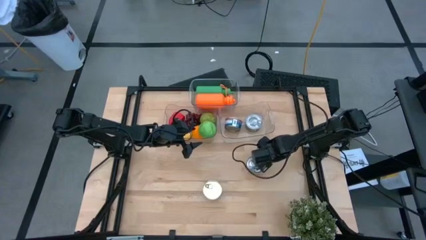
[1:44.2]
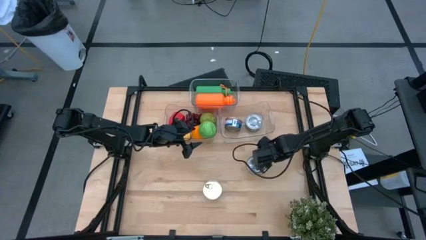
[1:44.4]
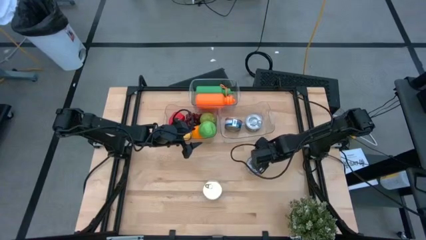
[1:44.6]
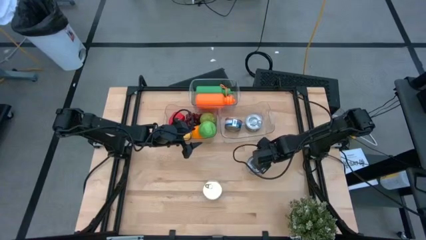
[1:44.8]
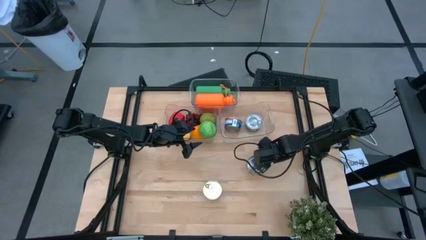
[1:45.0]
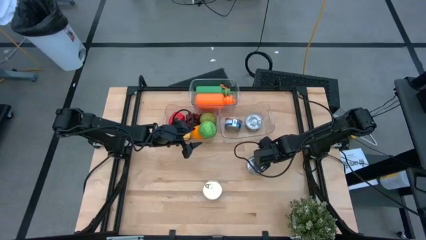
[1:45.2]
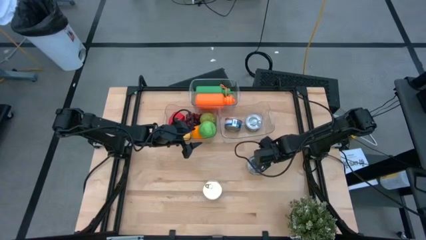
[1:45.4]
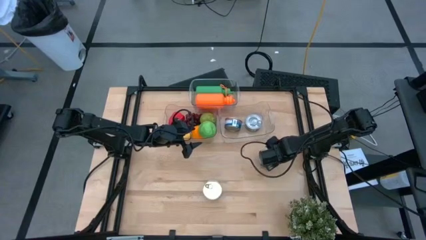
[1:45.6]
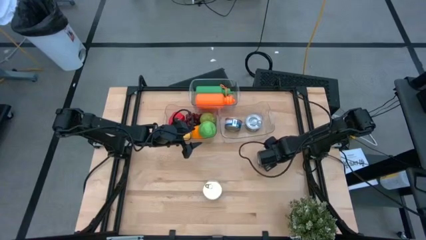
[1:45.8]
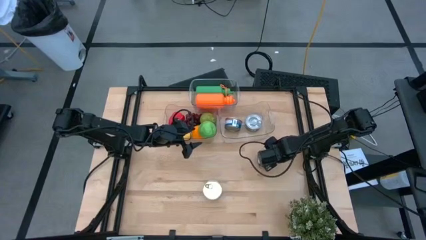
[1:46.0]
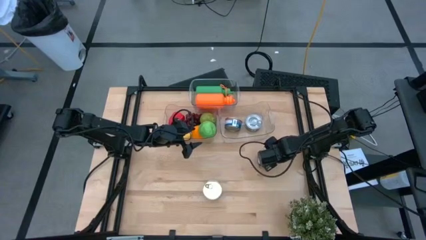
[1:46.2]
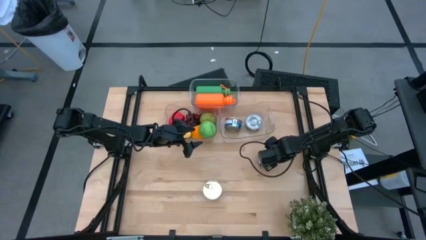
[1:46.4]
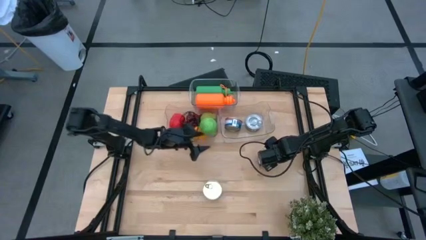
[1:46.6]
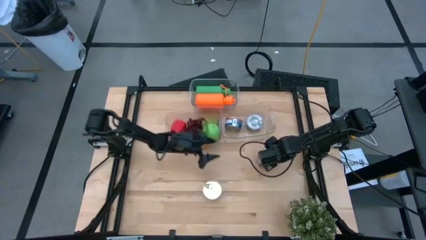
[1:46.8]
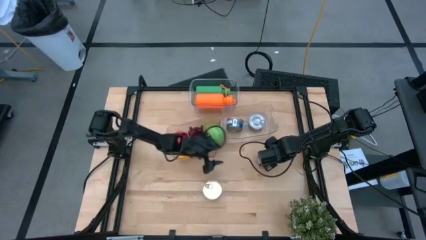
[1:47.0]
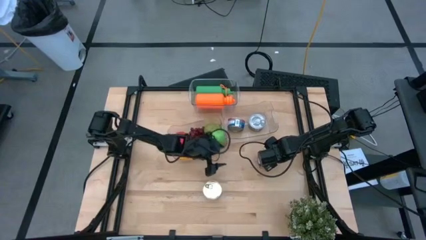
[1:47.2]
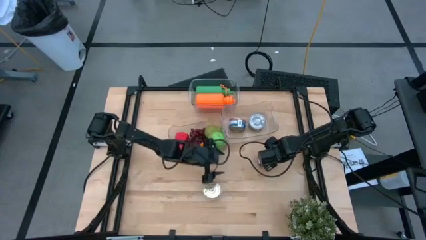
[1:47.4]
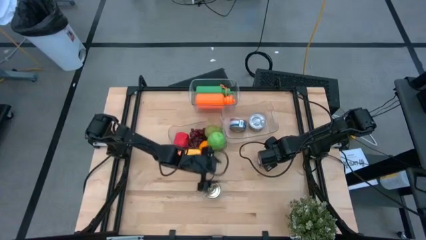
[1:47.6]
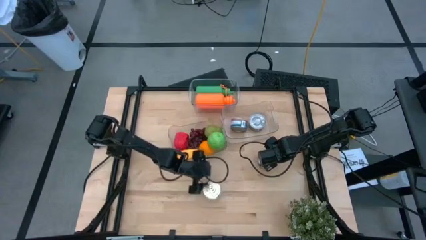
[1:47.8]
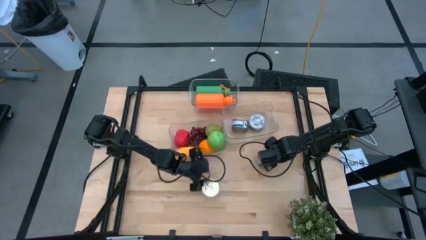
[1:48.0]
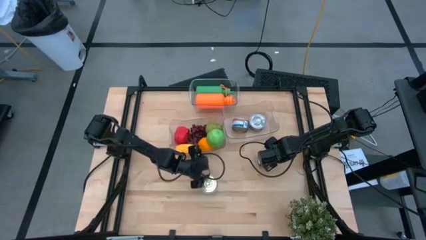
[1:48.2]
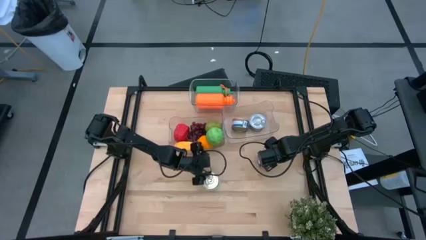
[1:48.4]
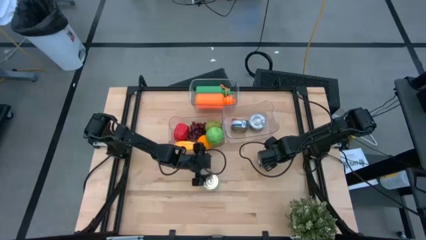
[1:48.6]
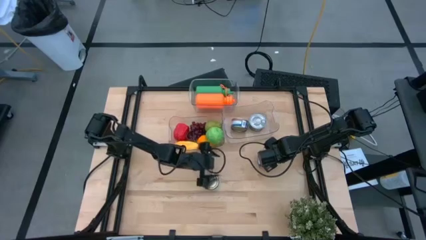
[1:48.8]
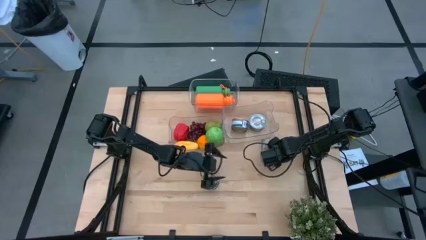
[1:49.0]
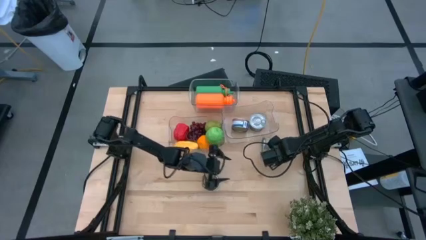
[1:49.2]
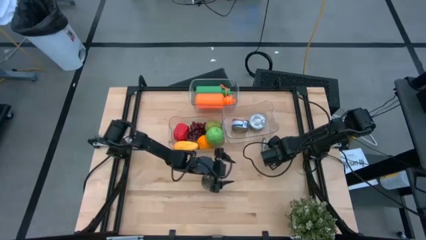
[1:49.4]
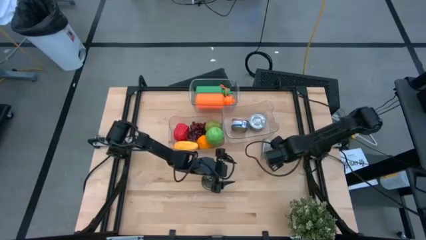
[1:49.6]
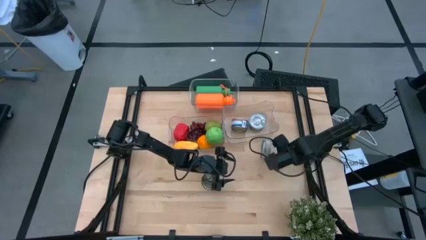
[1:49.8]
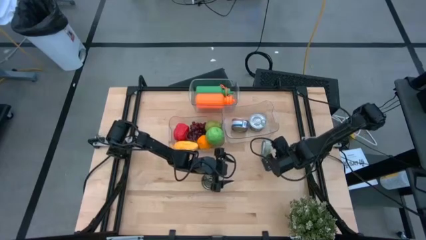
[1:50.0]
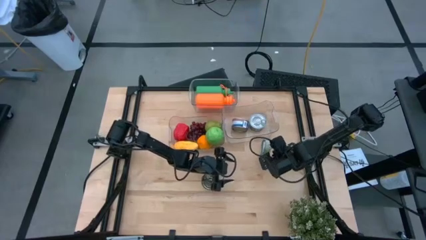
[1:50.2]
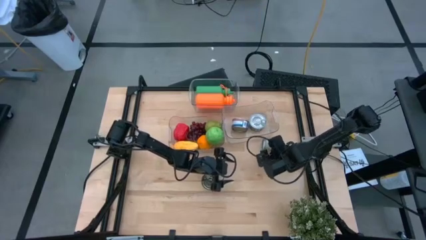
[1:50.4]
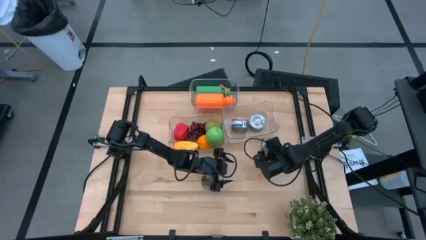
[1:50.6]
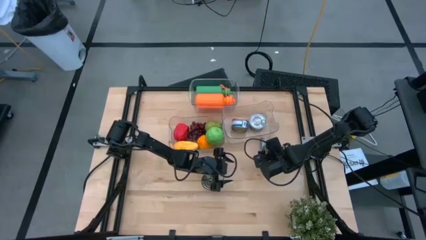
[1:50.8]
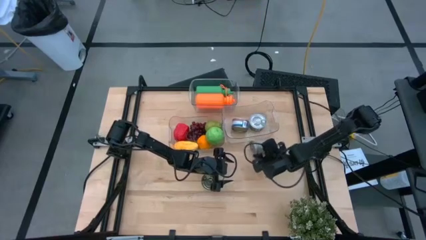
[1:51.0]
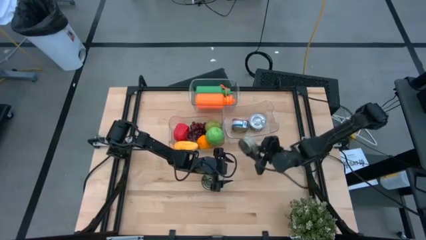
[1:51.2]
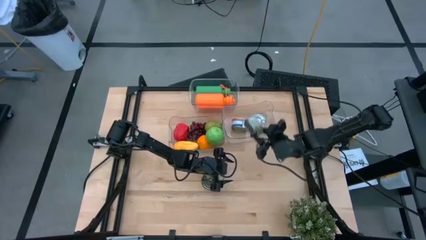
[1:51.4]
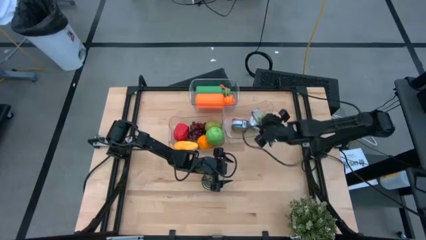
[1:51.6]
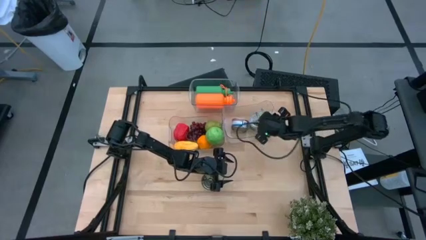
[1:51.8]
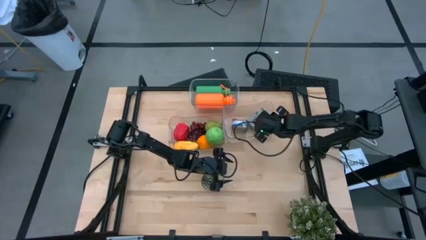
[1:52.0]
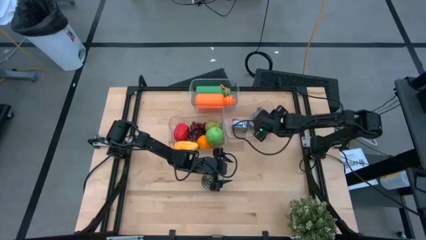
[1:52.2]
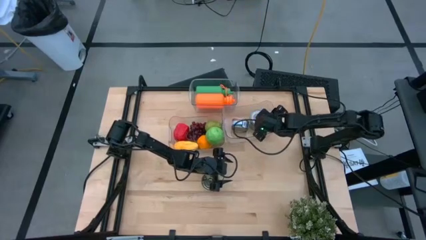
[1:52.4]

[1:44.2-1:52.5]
Task: Pick & Place Food Item
Put the green tuna can into the bottom right transparent bin

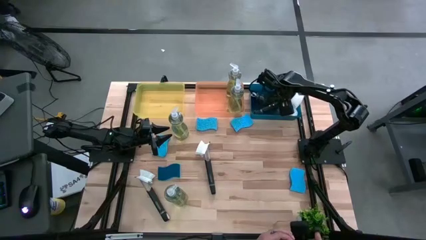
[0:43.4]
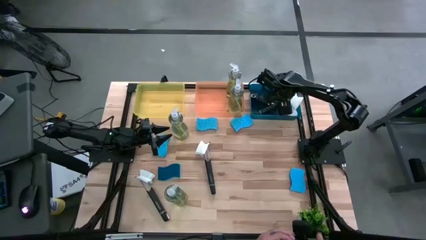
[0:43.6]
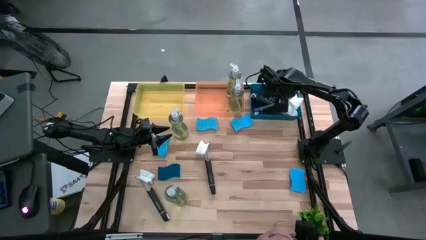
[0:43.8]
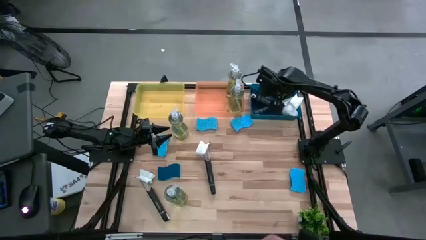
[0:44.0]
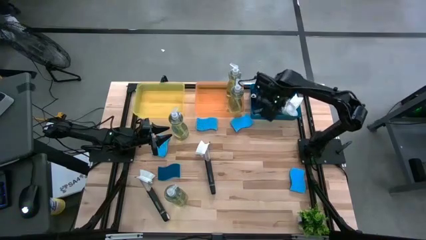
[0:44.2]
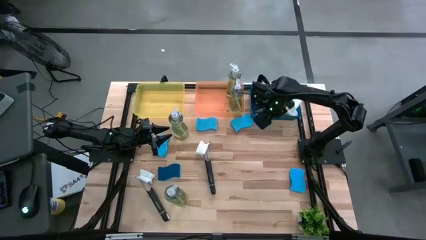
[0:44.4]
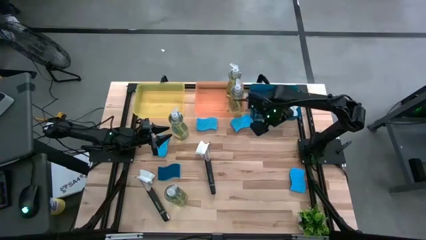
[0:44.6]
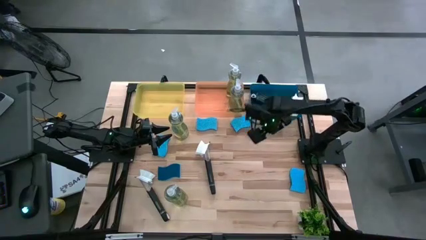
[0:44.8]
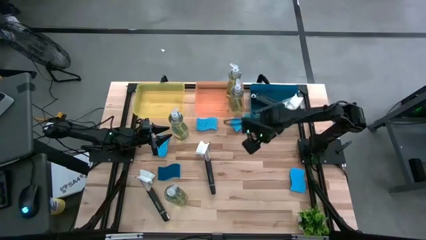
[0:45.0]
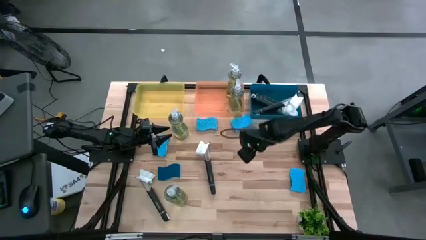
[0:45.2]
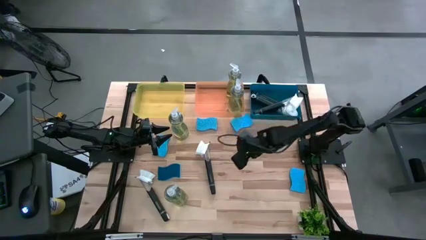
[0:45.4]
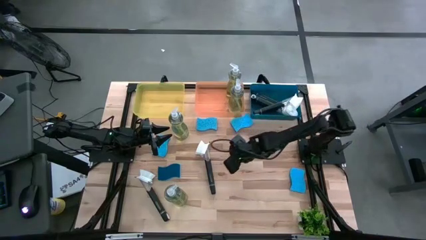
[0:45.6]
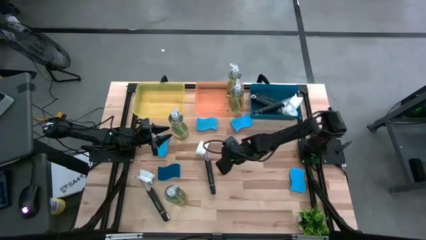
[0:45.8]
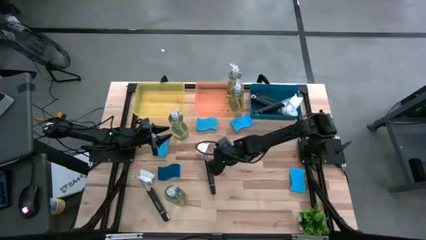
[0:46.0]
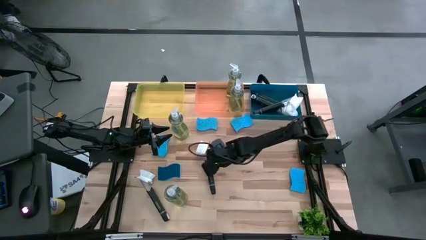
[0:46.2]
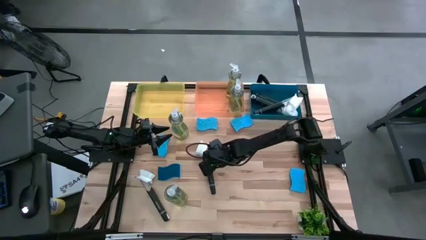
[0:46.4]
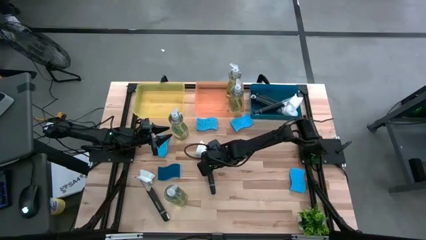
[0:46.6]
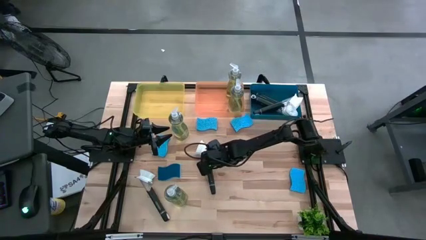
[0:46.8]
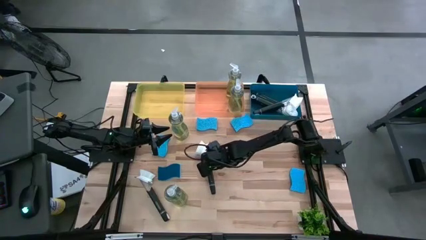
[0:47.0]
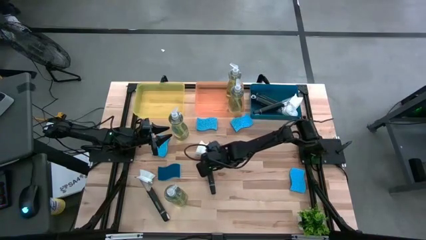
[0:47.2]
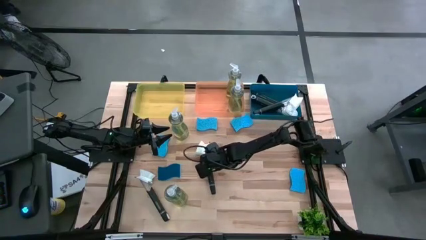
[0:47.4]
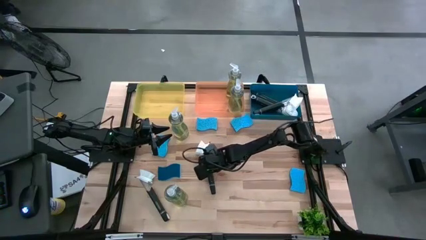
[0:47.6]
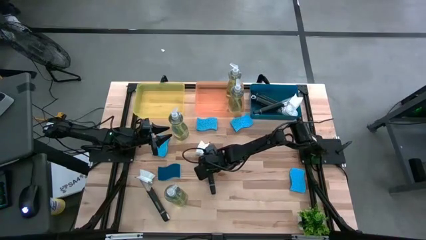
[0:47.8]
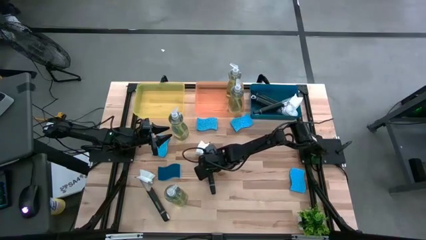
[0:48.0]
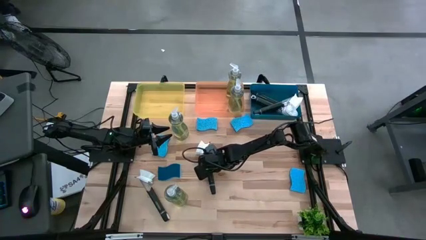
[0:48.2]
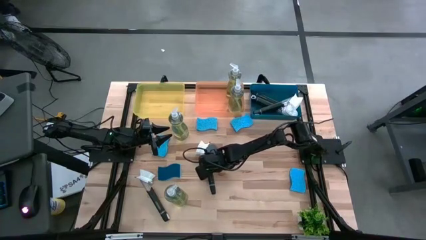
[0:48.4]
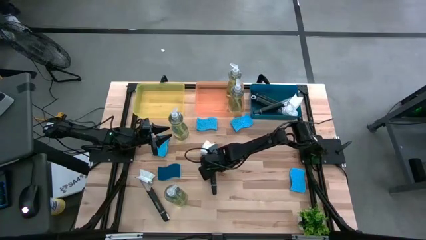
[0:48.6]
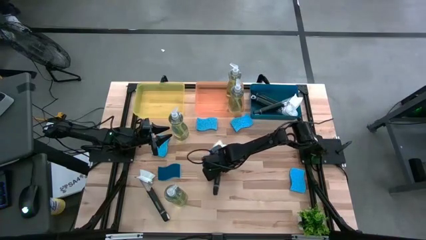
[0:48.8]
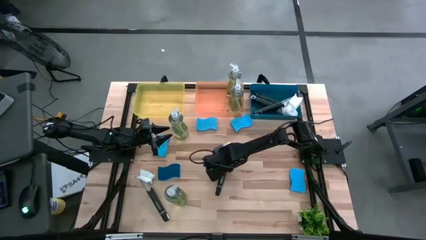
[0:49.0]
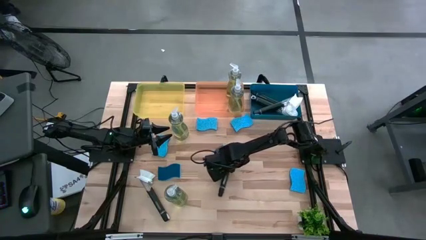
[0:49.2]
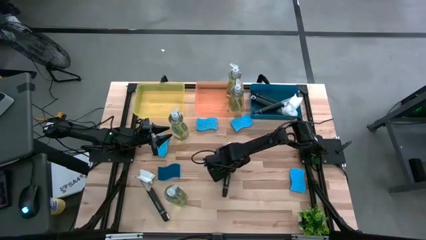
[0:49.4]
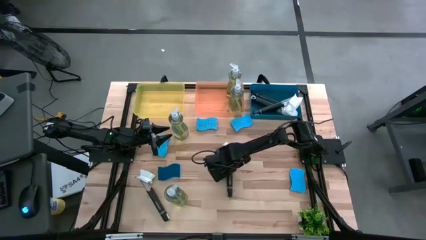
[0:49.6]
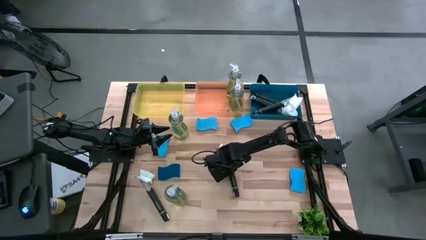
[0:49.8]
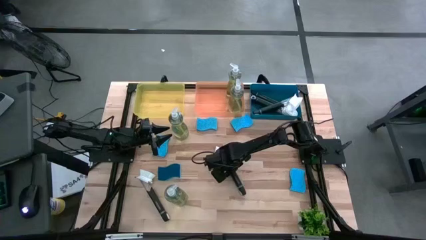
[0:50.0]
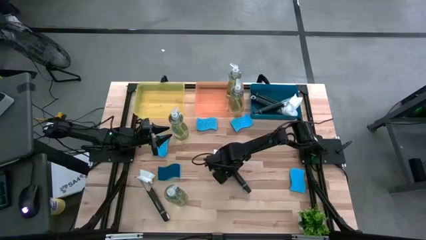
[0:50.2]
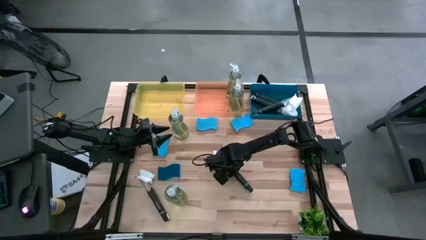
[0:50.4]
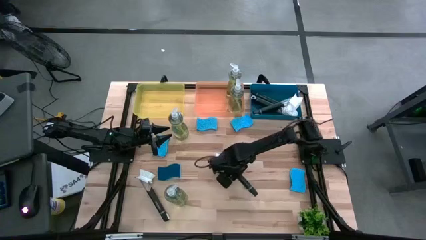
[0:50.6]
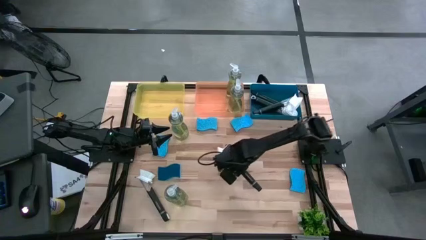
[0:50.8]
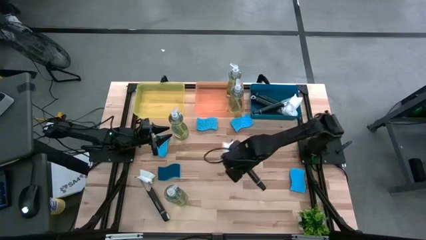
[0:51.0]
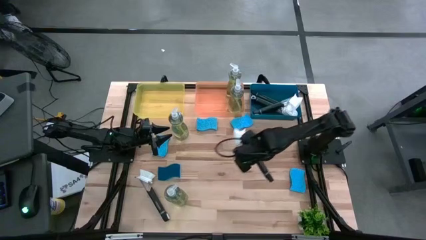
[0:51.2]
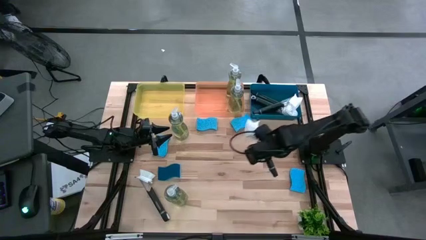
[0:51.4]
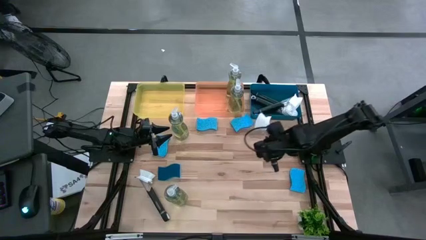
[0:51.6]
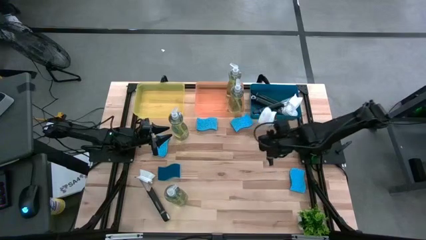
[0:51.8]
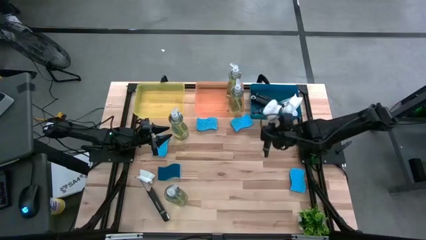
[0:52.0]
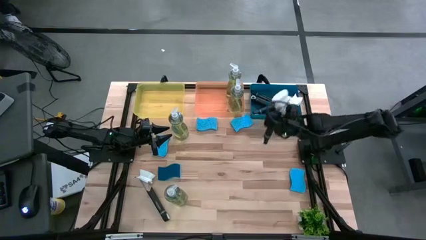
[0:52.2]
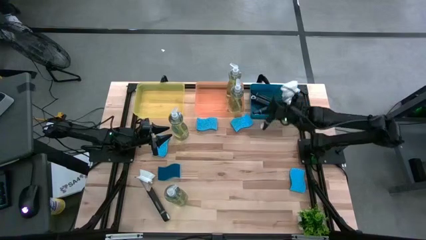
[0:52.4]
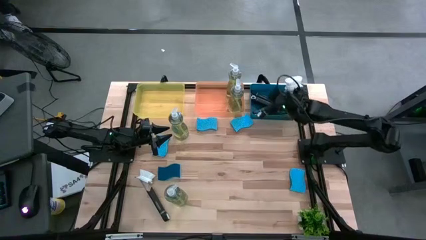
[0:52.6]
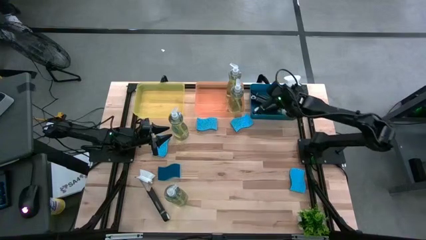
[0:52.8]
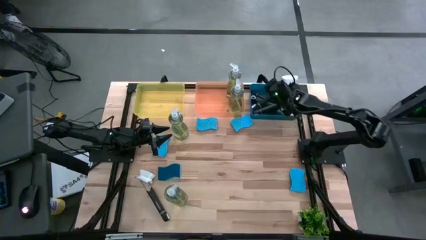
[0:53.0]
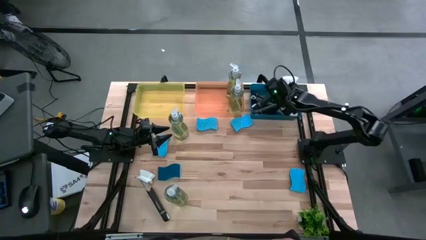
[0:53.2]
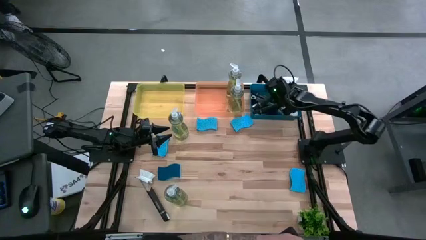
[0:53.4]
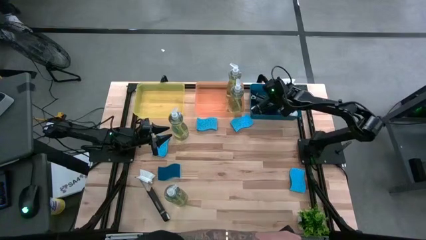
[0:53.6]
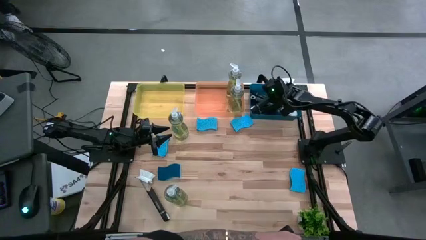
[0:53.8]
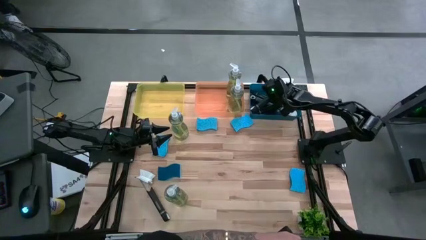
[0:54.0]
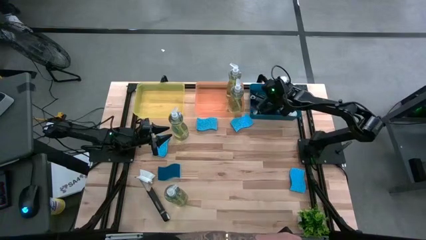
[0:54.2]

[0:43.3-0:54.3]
Task: Pick & Place Kitchen Sink Supplies
Put the black dish brush into the blue bin
